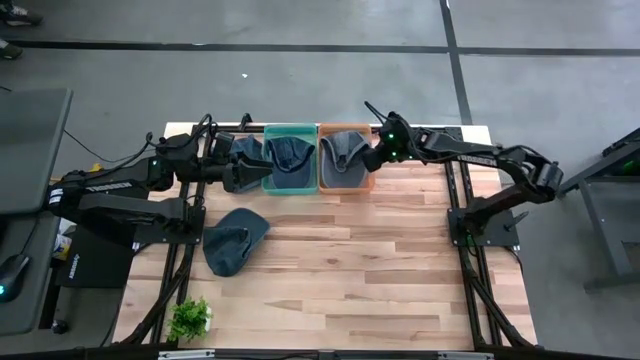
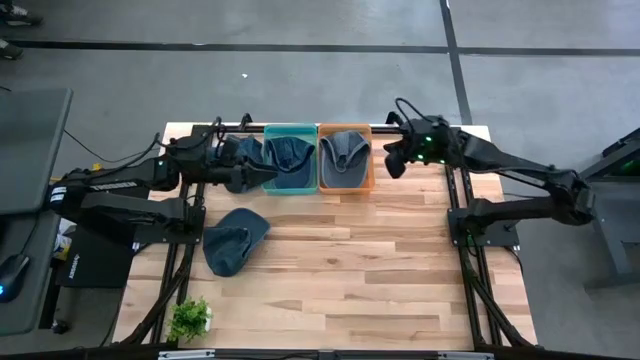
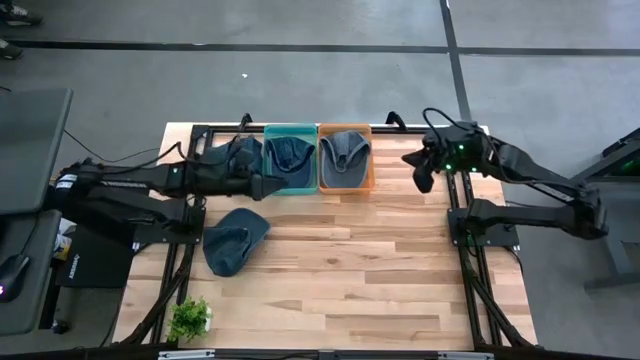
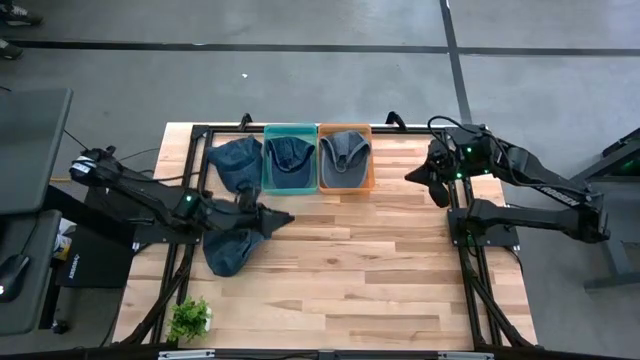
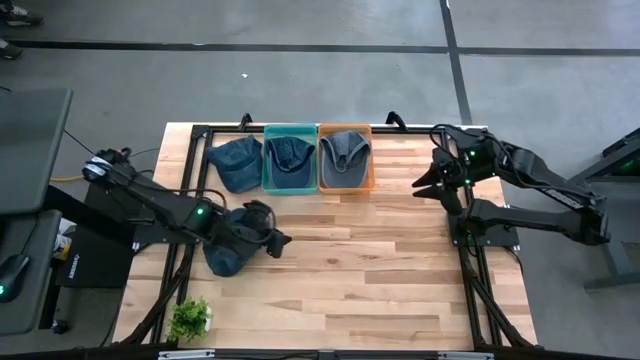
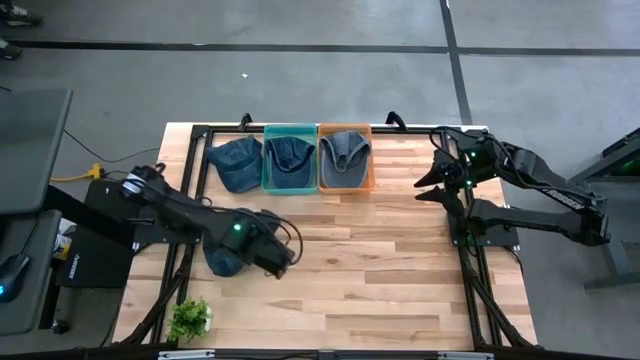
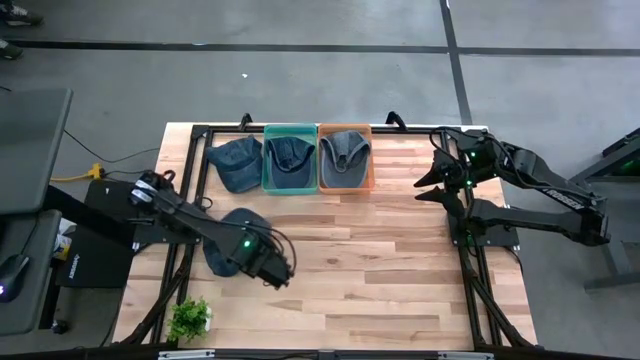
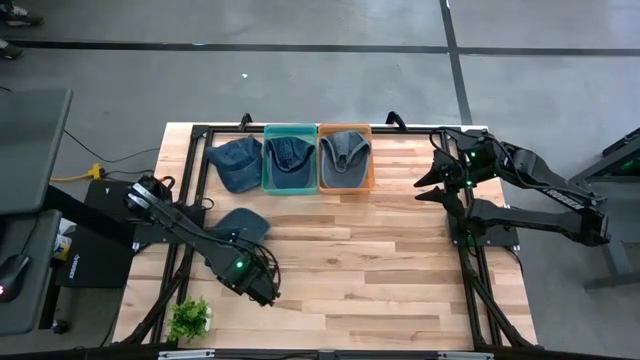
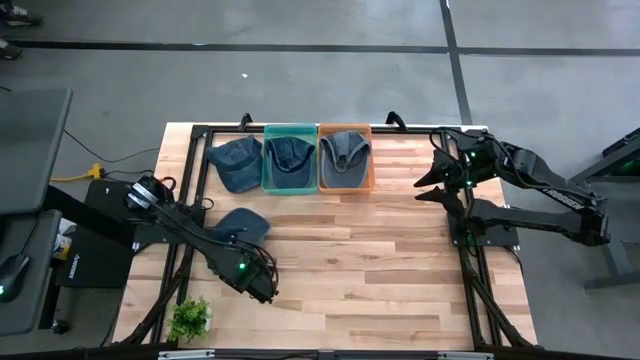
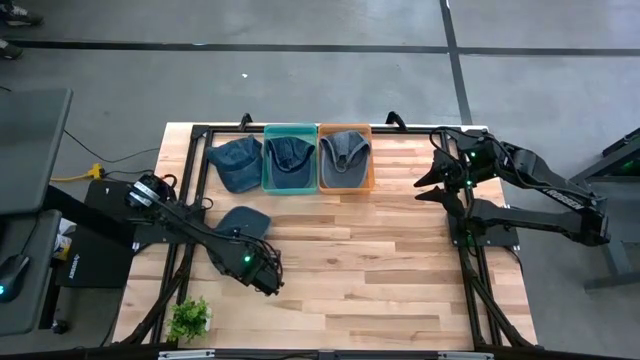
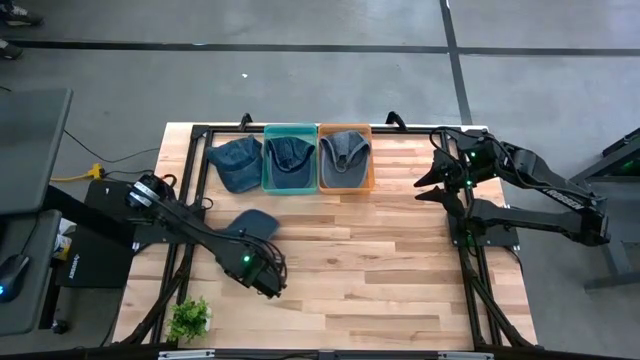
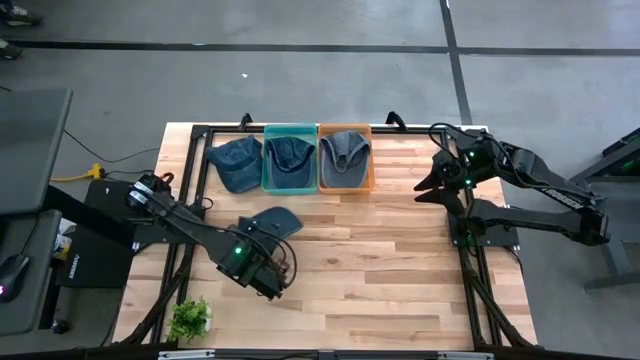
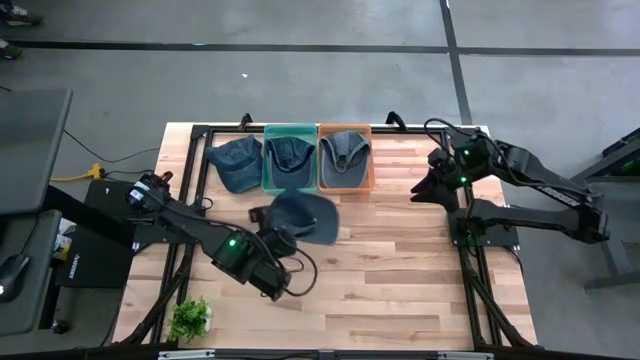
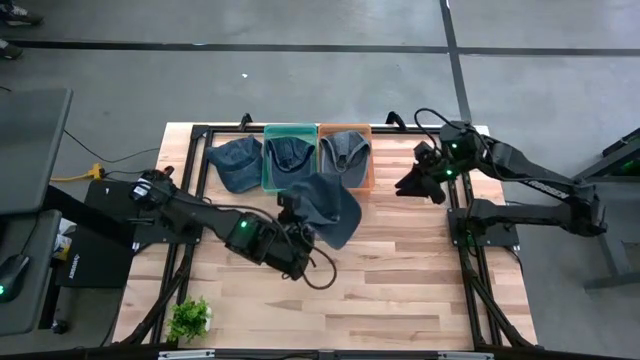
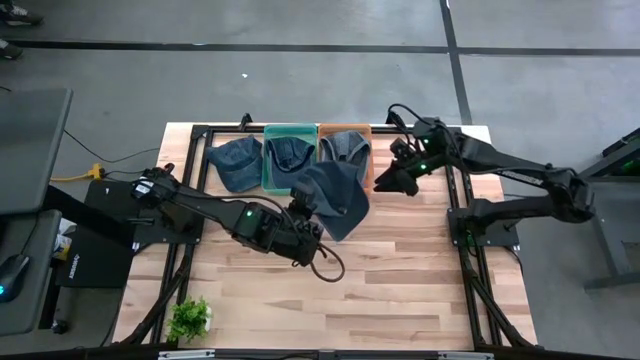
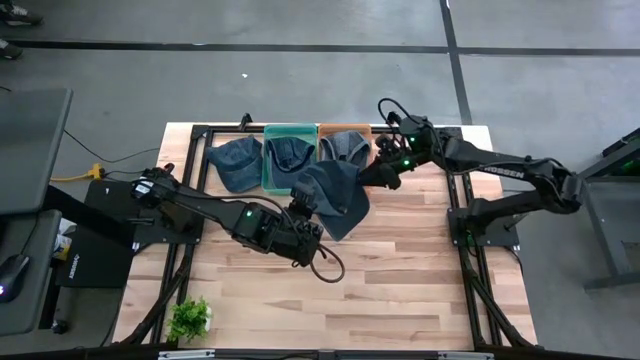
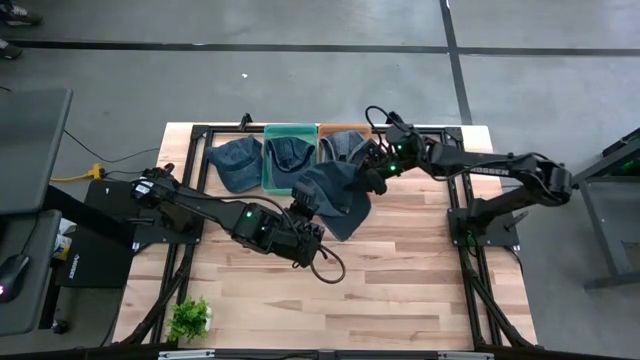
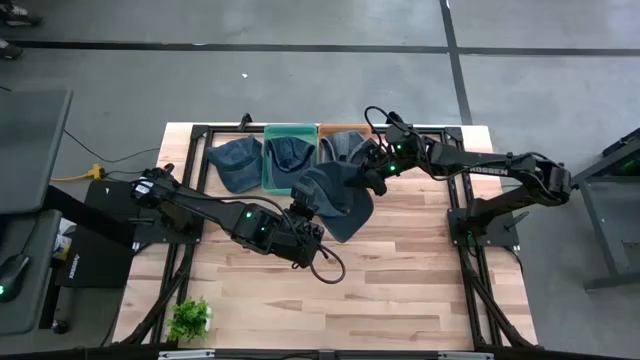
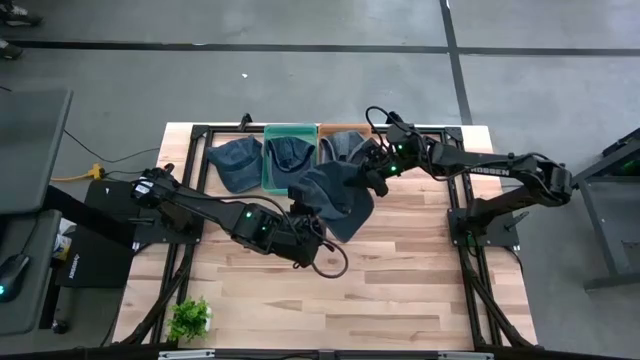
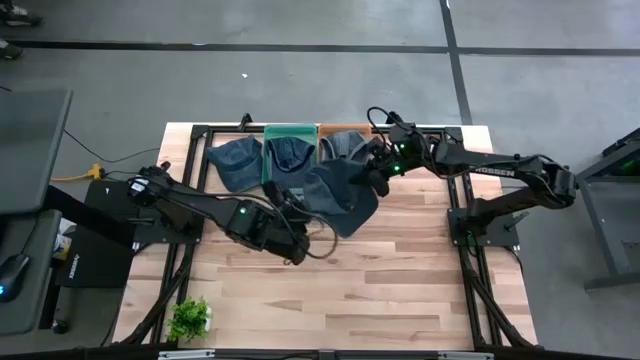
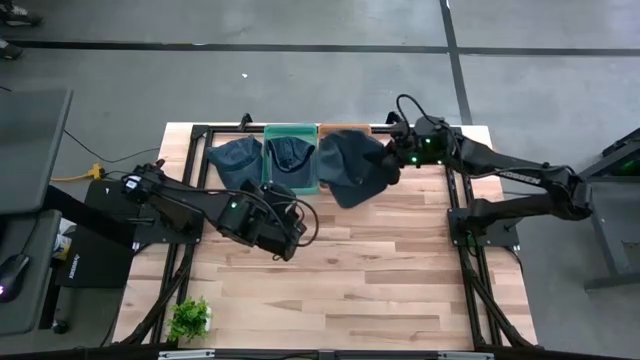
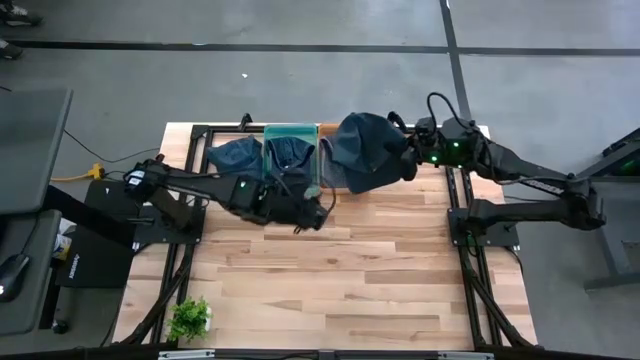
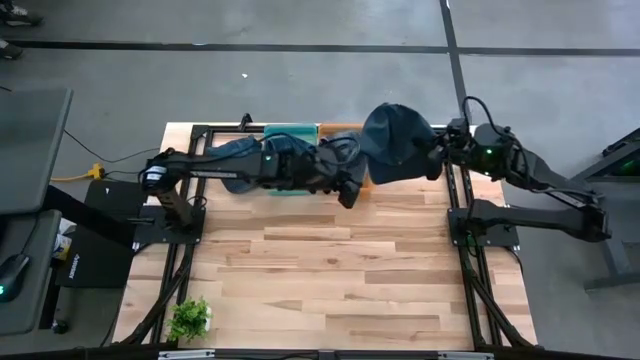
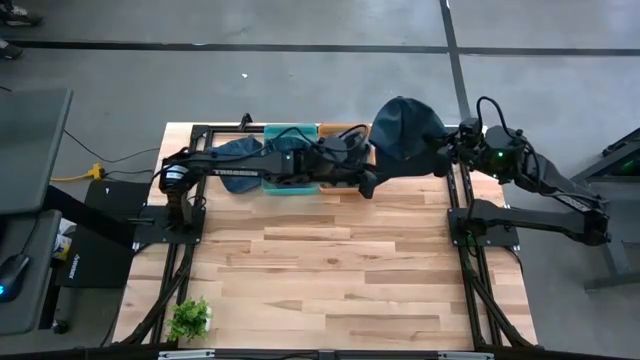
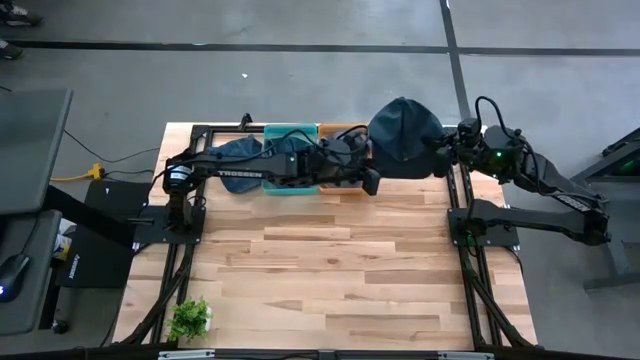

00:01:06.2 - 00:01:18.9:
Task: Pick & Place hat
Put the bottom blue cap into the green bin
